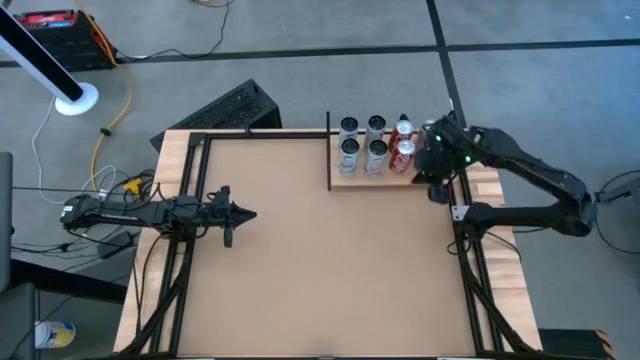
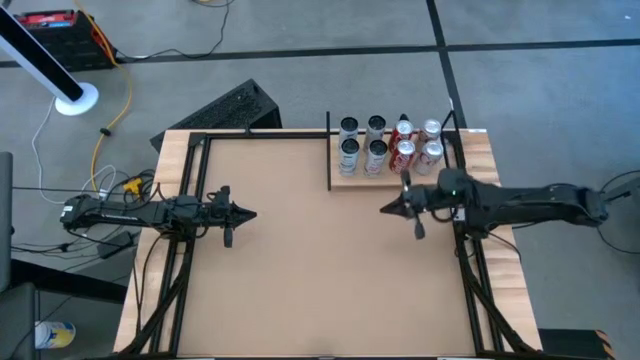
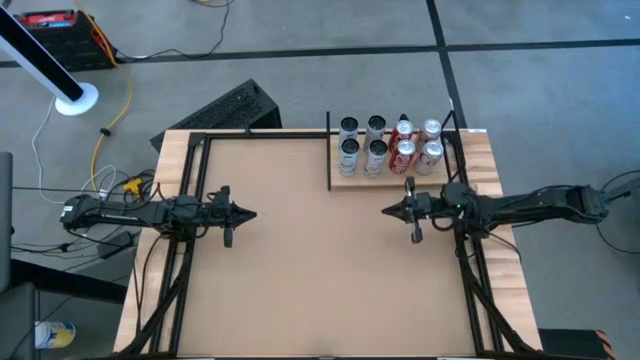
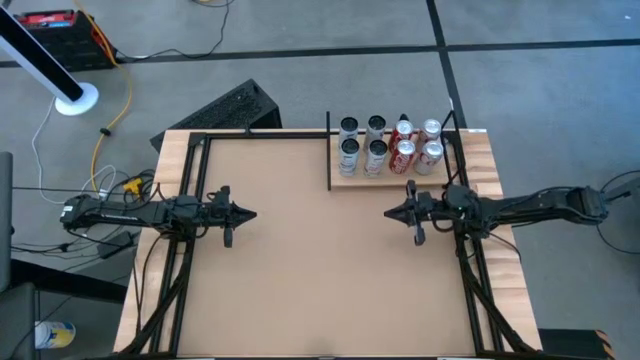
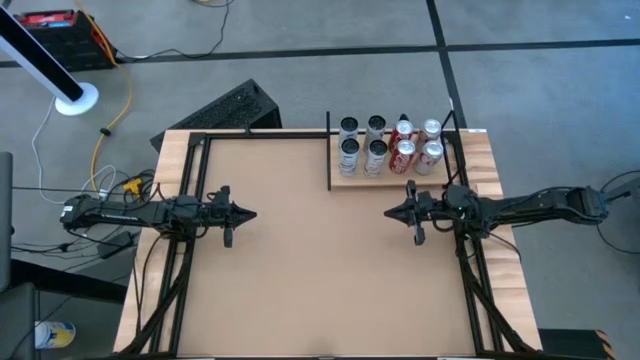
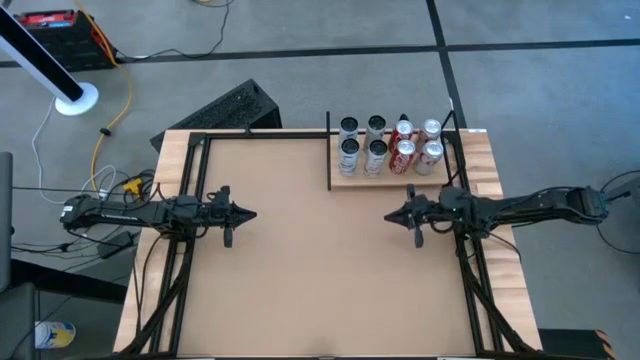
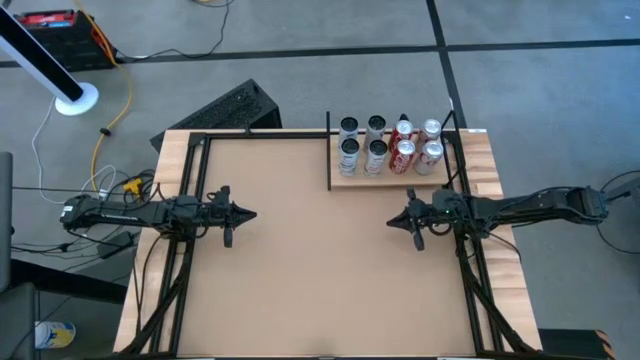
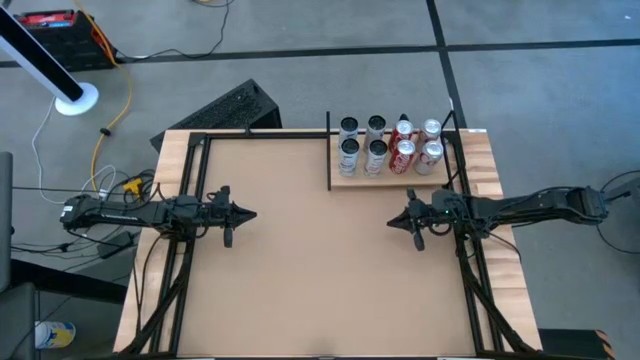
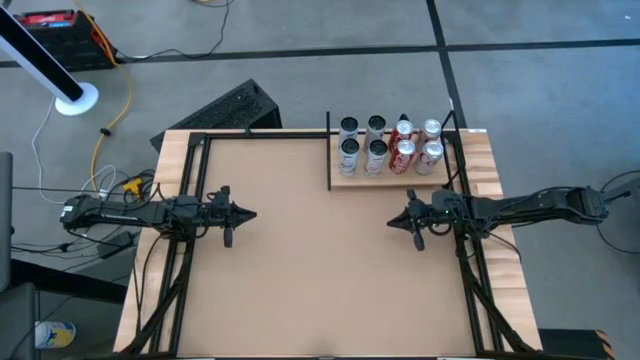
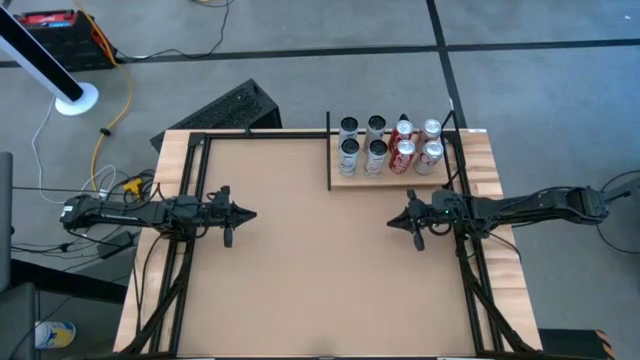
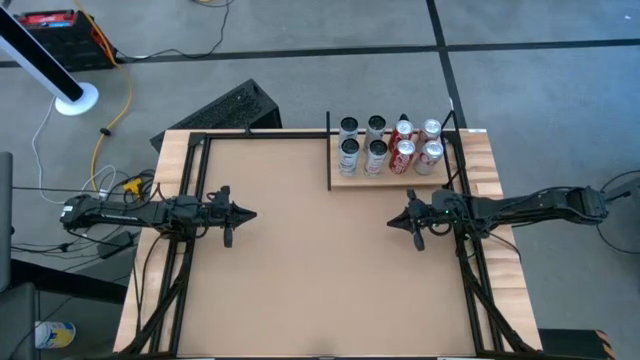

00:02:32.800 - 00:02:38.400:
Task: Place canned beverage on shelf
Return to Home Position

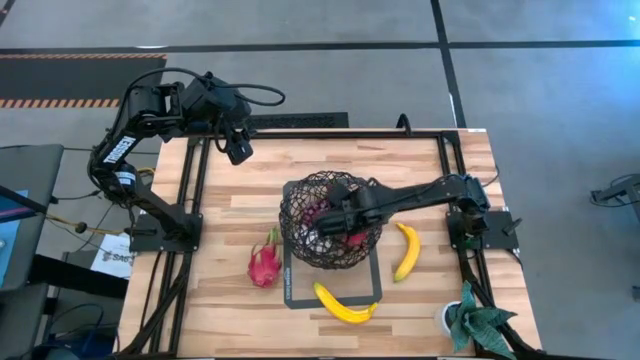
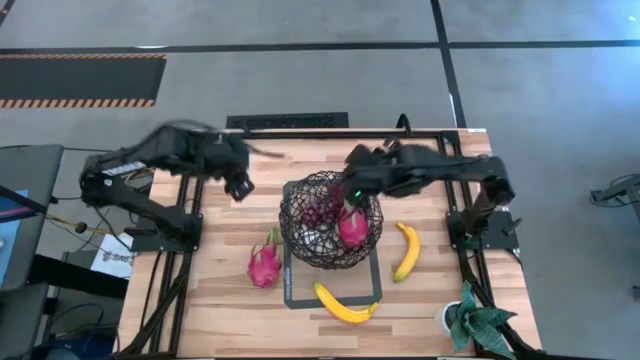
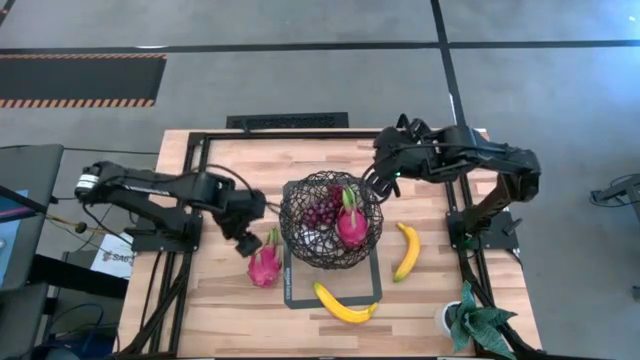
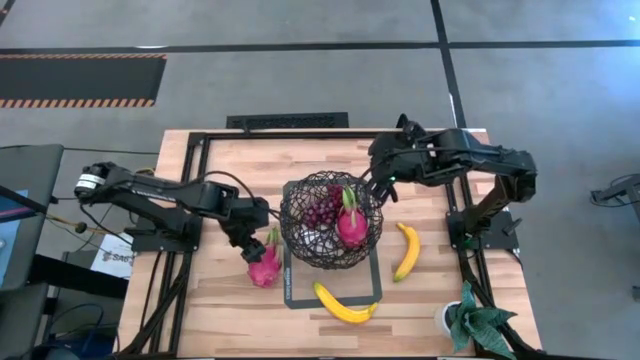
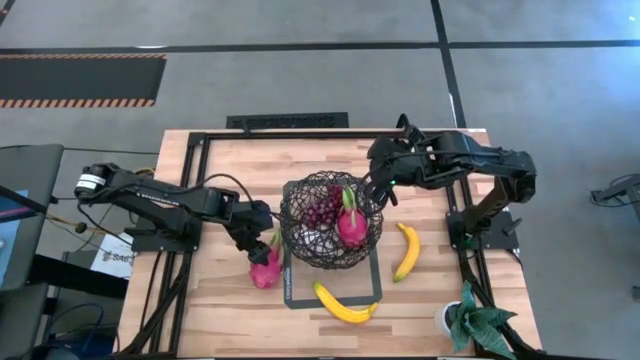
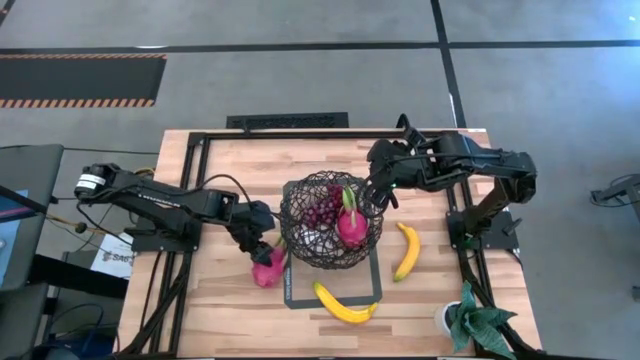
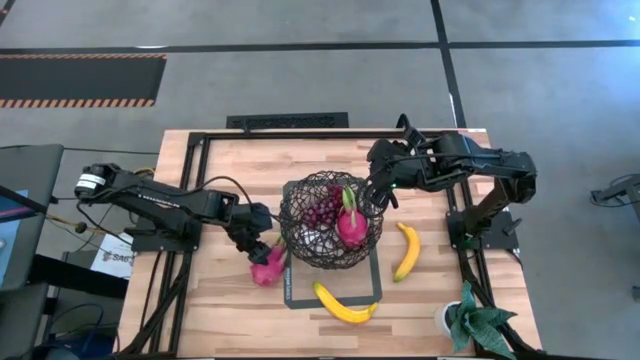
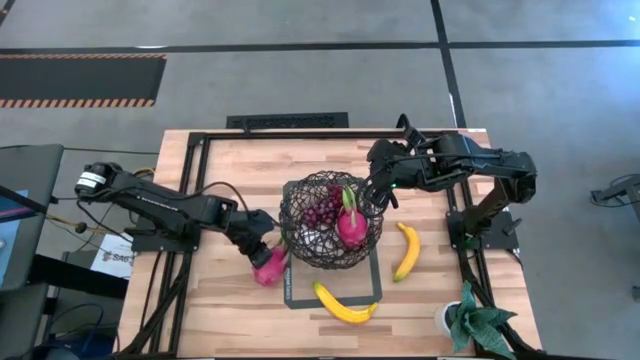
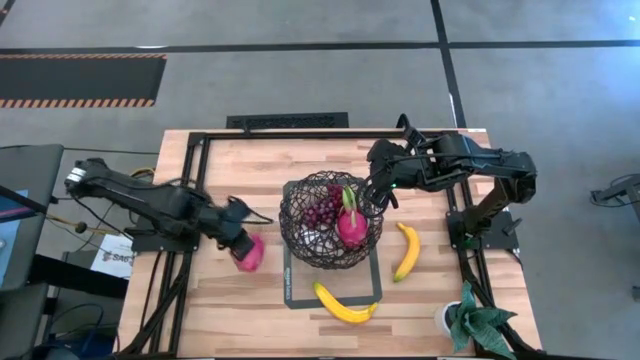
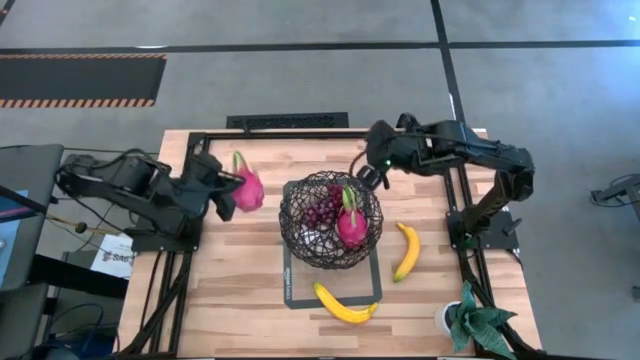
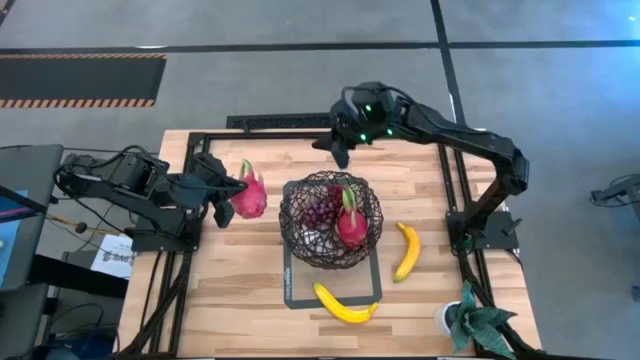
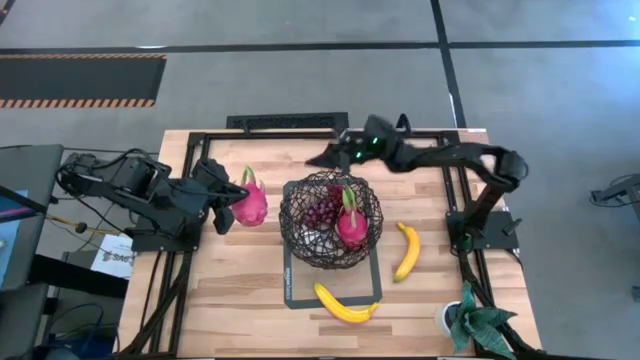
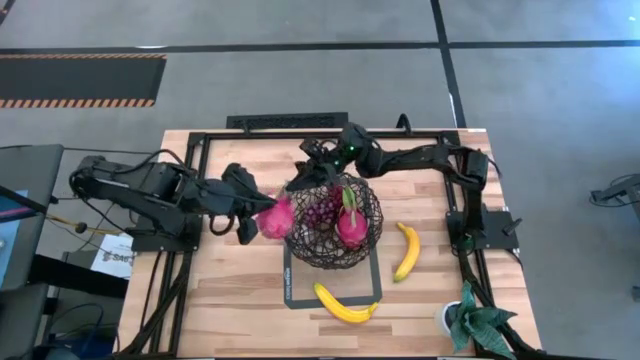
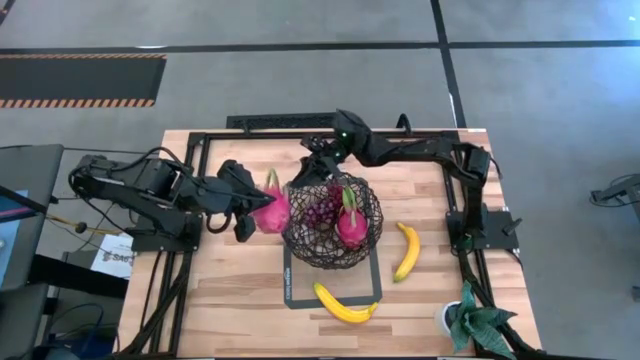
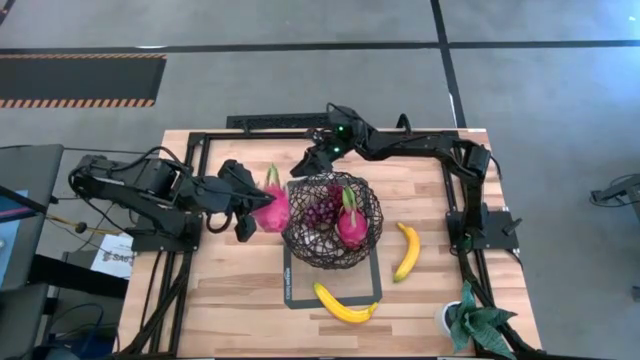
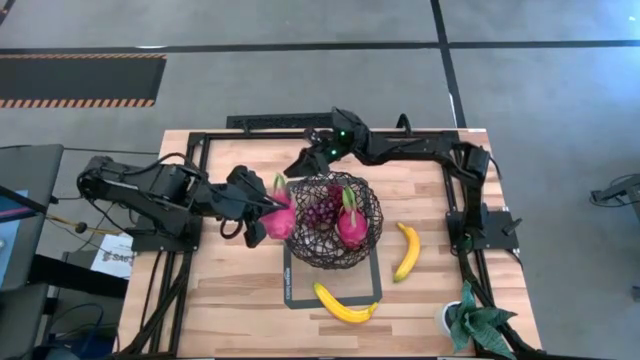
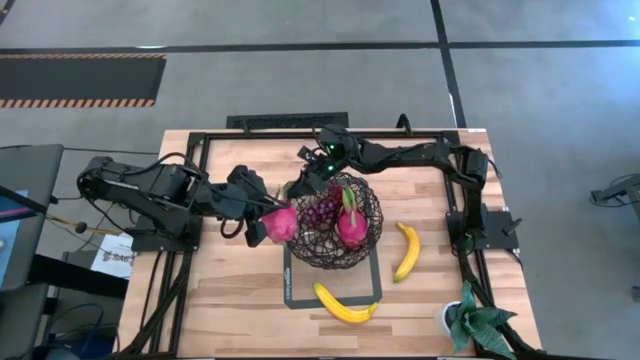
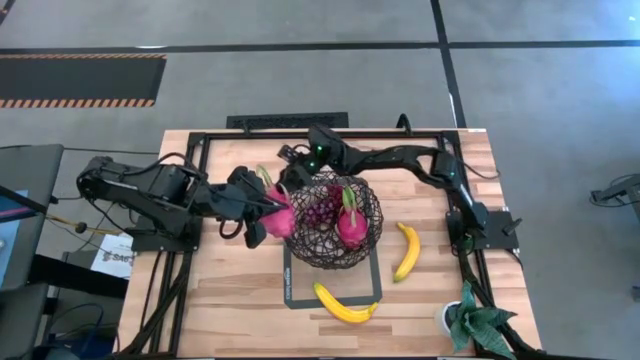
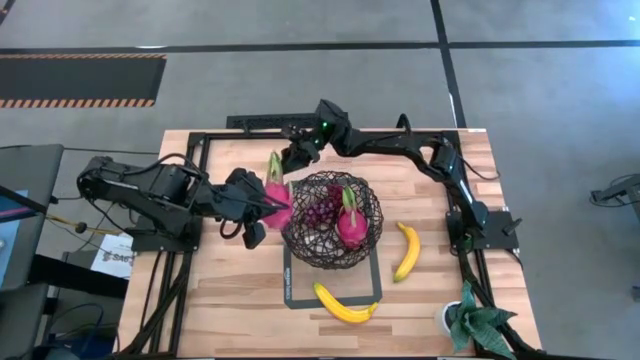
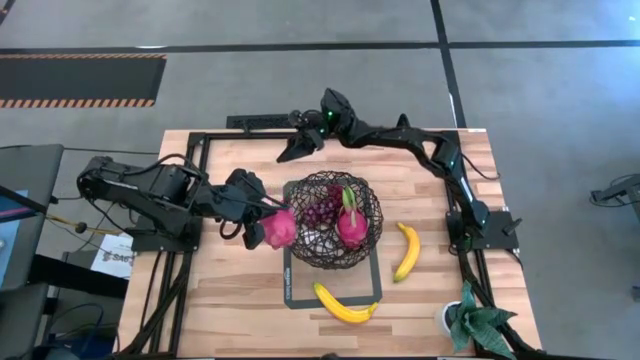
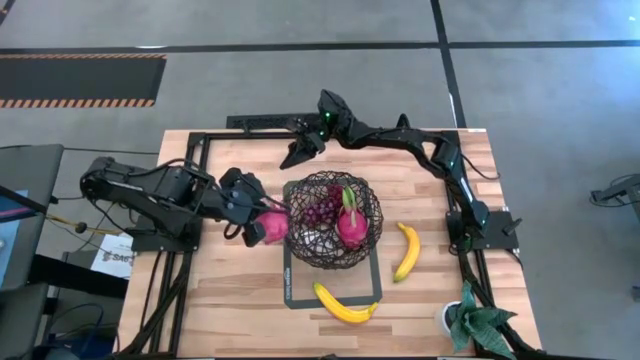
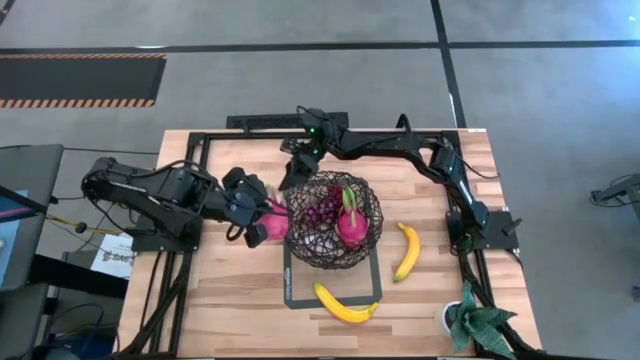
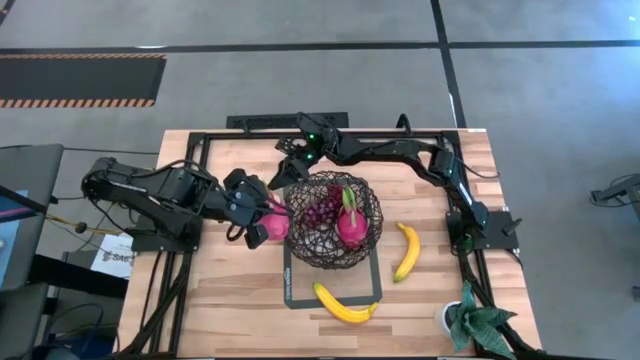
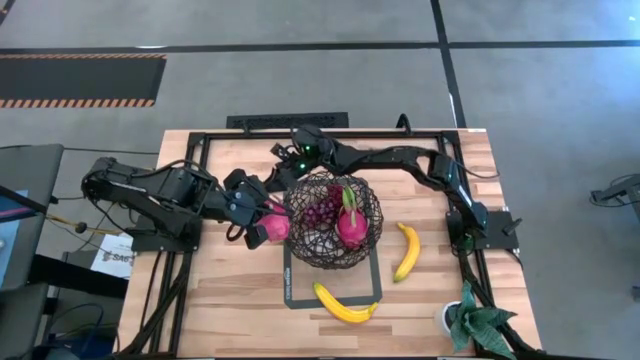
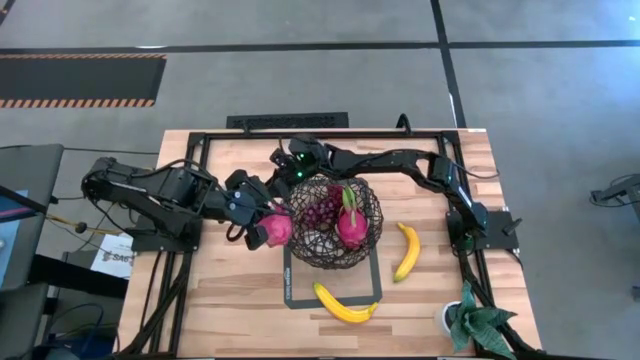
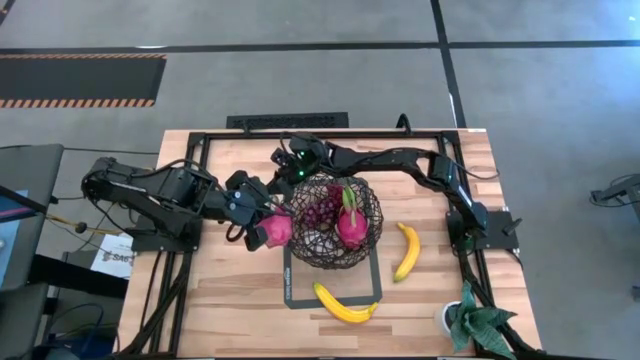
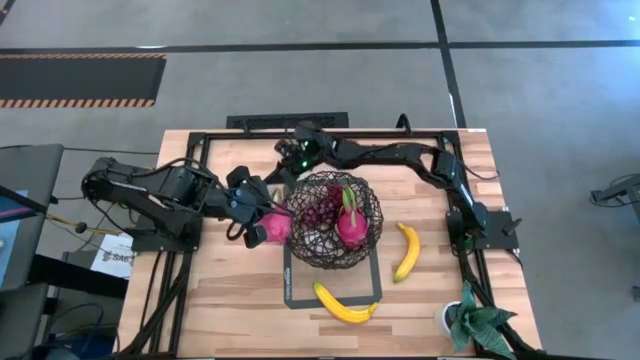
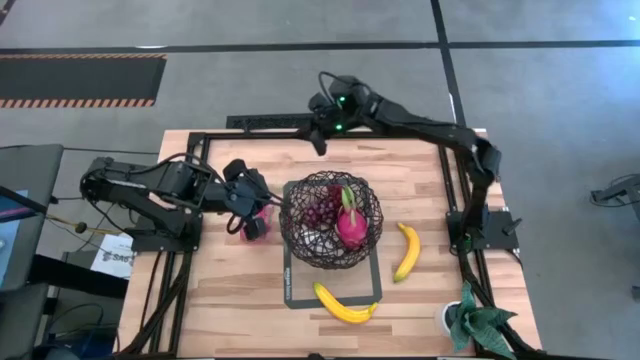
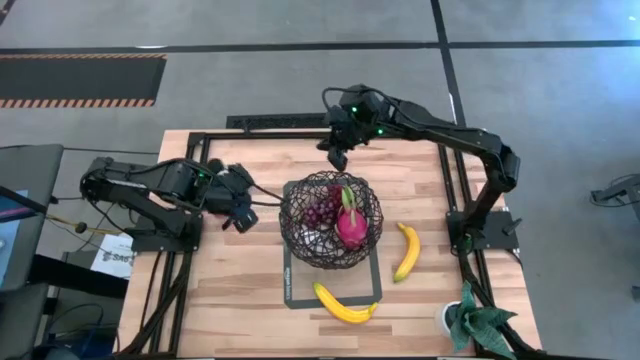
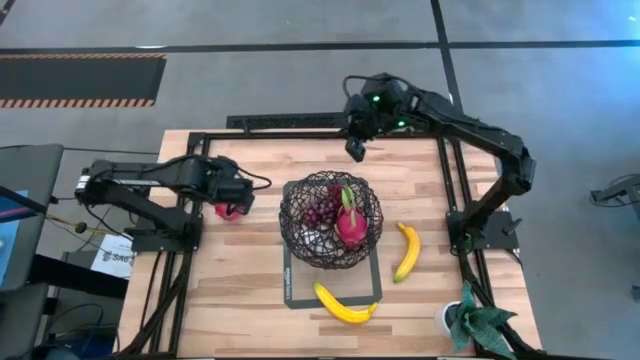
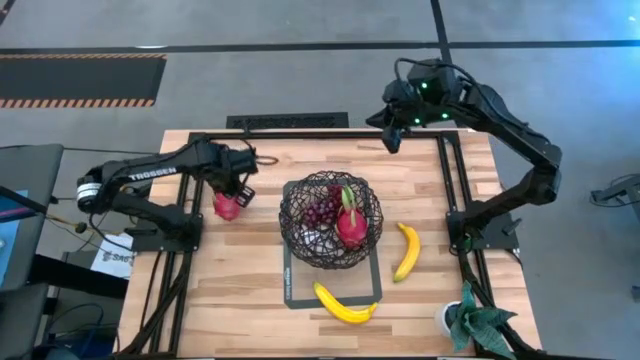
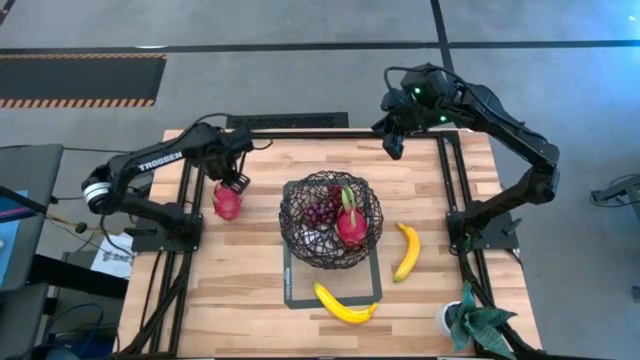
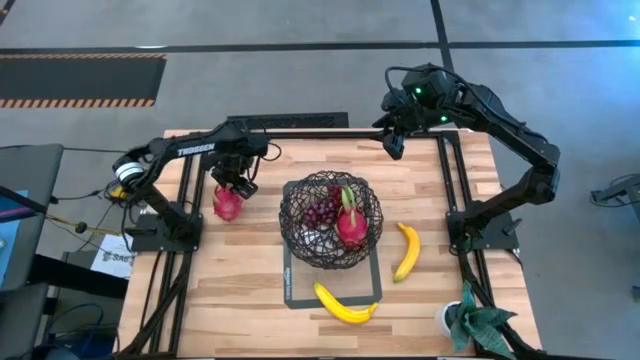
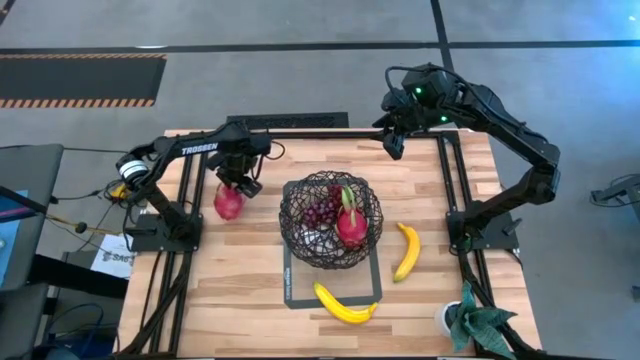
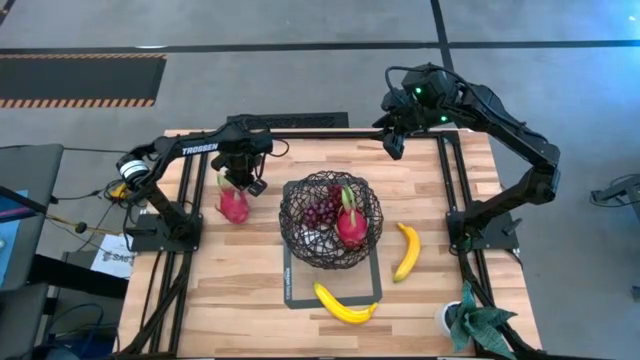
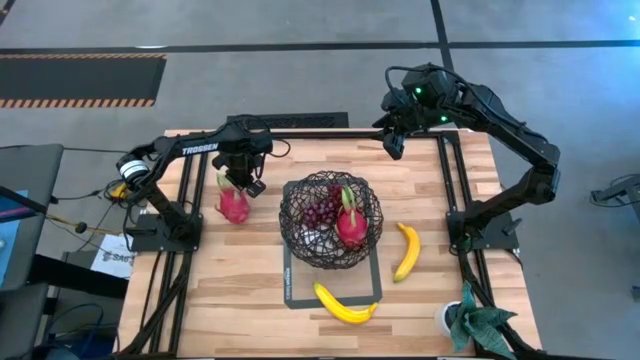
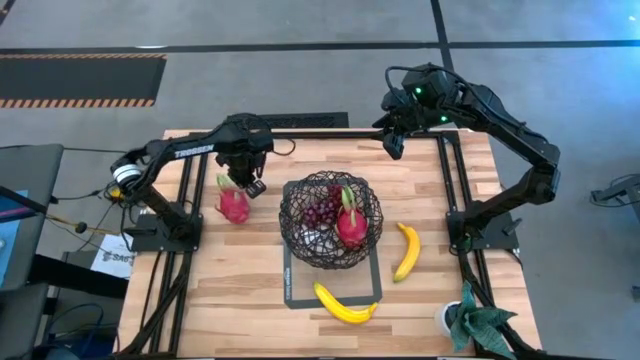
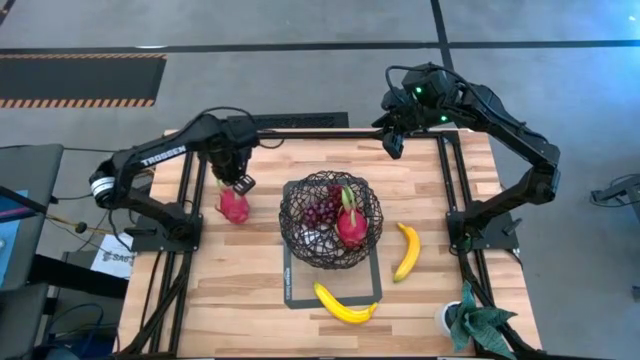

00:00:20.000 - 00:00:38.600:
Task: Build produce basket
Put the red dragon fruit into the black wire basket
